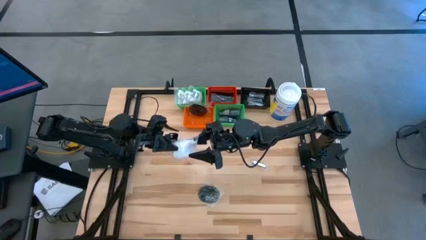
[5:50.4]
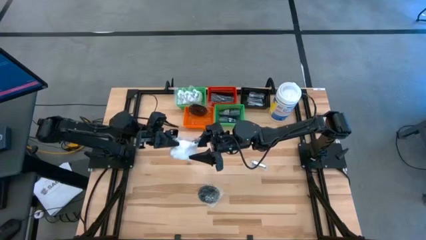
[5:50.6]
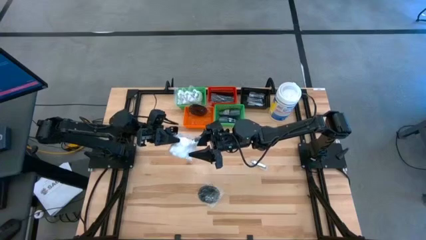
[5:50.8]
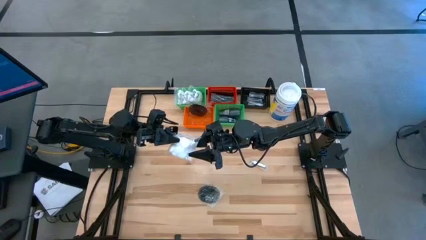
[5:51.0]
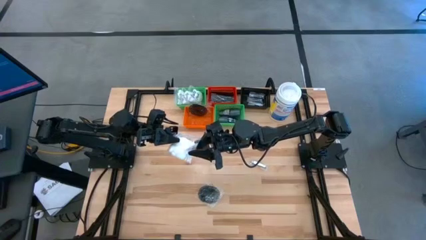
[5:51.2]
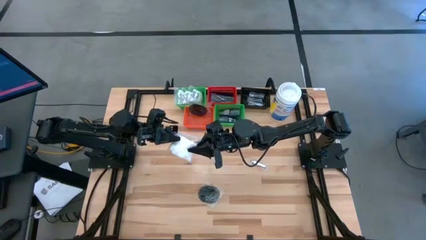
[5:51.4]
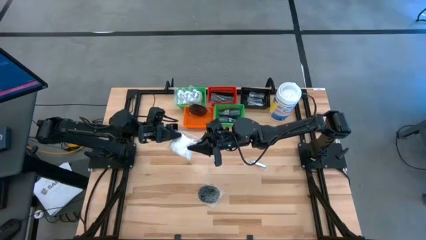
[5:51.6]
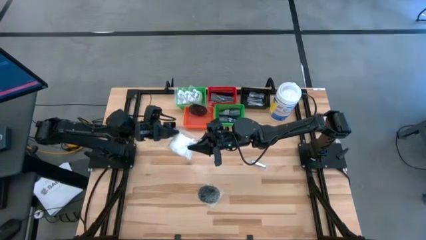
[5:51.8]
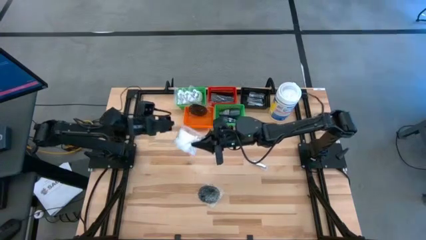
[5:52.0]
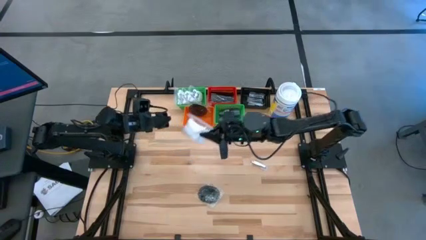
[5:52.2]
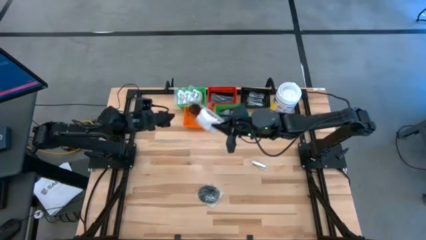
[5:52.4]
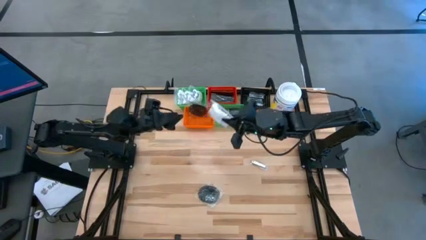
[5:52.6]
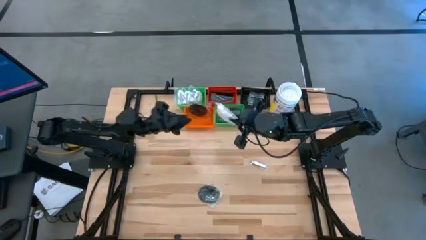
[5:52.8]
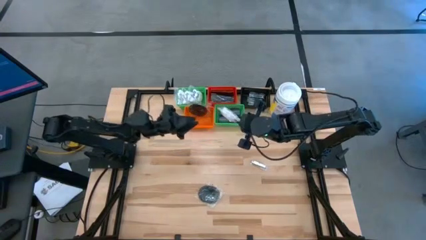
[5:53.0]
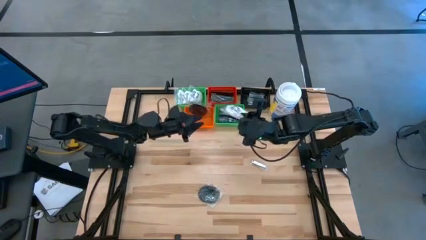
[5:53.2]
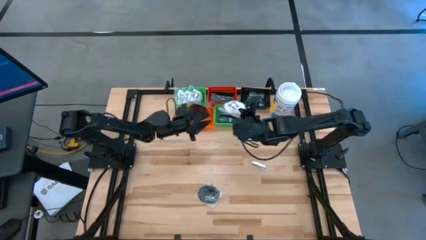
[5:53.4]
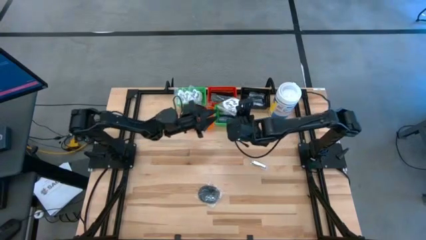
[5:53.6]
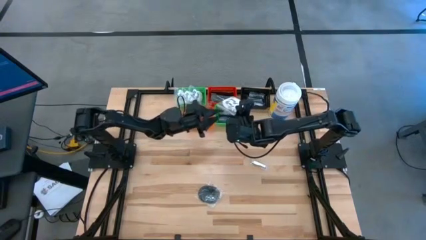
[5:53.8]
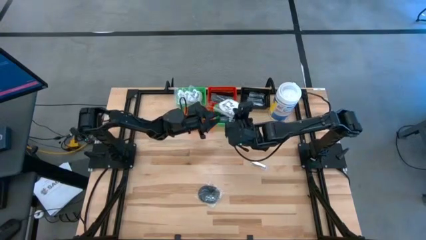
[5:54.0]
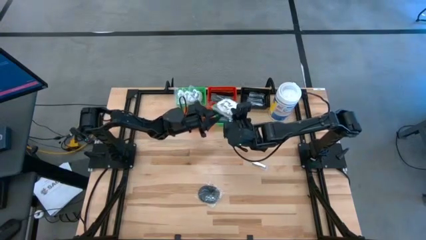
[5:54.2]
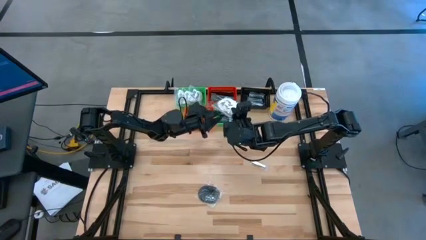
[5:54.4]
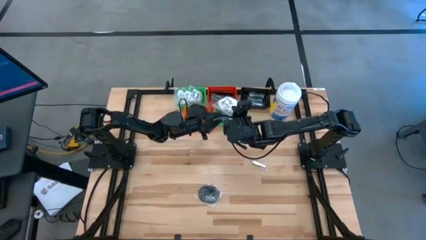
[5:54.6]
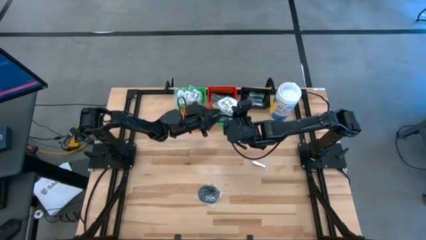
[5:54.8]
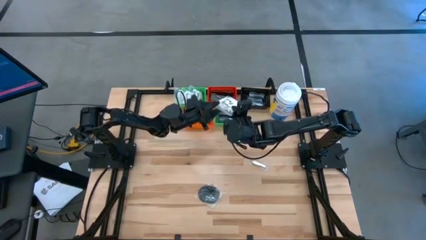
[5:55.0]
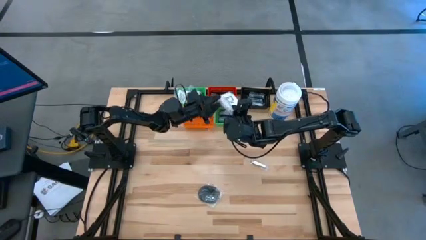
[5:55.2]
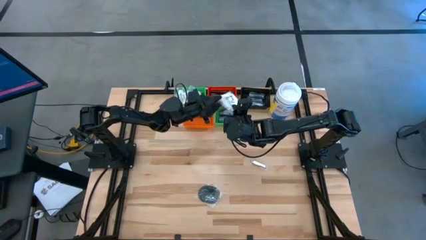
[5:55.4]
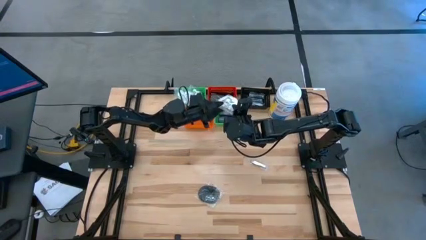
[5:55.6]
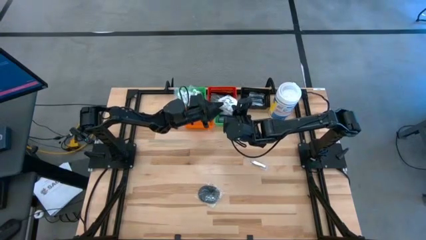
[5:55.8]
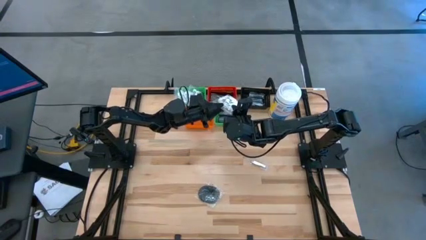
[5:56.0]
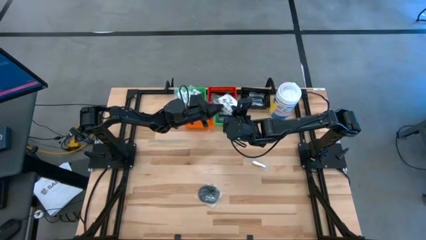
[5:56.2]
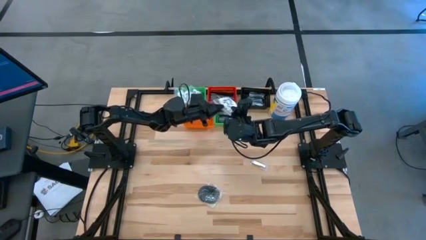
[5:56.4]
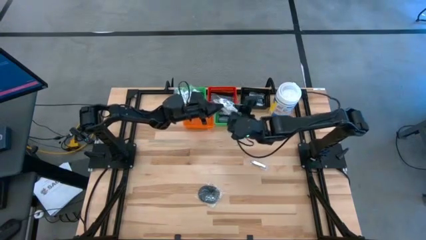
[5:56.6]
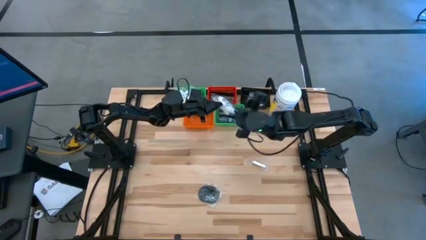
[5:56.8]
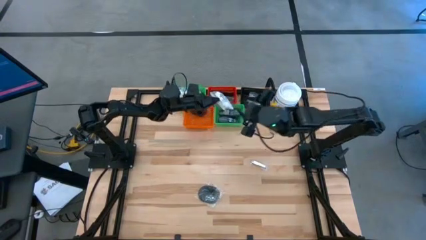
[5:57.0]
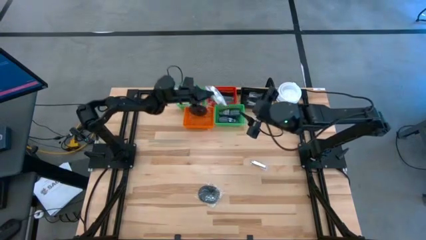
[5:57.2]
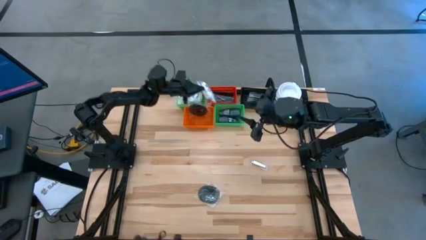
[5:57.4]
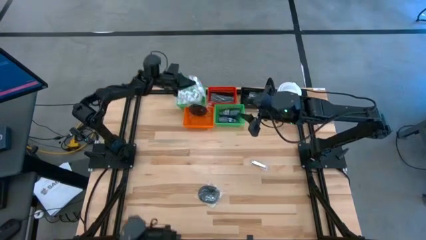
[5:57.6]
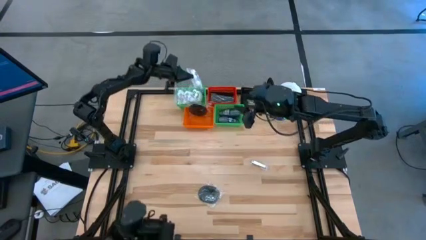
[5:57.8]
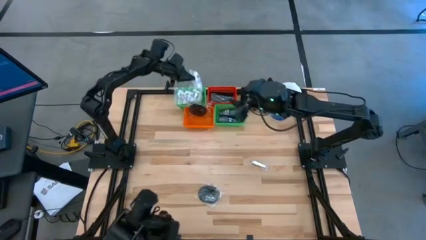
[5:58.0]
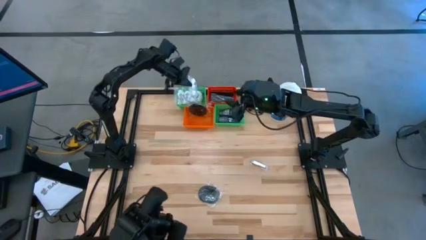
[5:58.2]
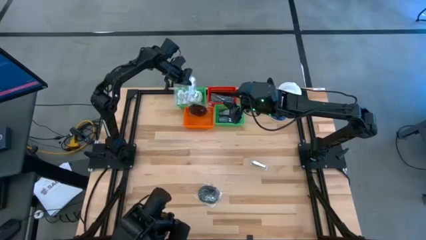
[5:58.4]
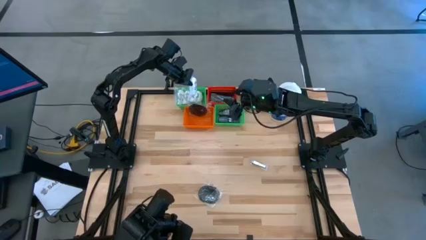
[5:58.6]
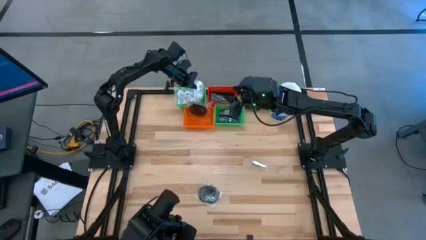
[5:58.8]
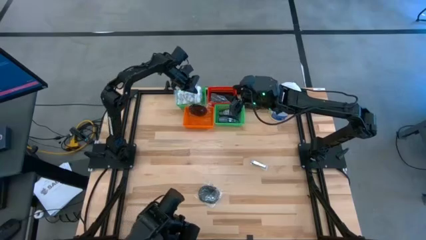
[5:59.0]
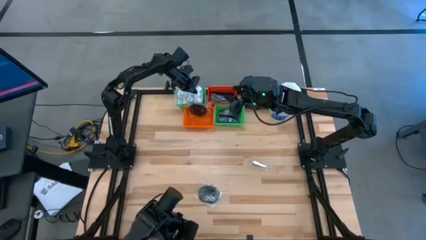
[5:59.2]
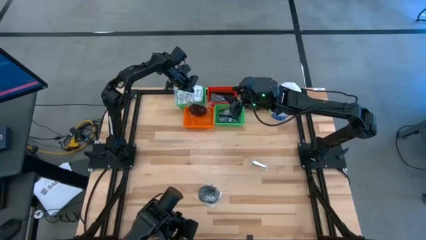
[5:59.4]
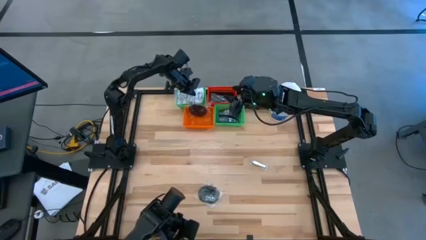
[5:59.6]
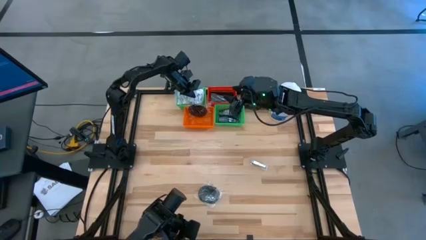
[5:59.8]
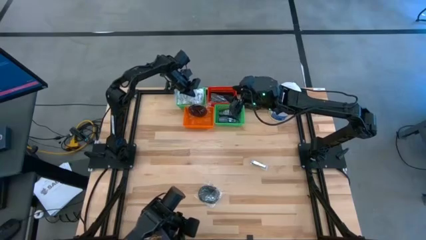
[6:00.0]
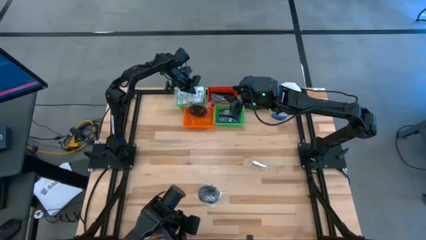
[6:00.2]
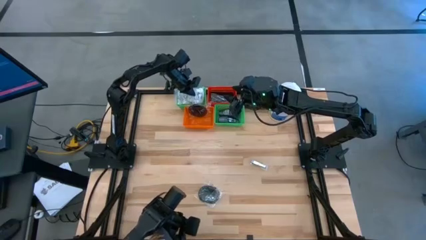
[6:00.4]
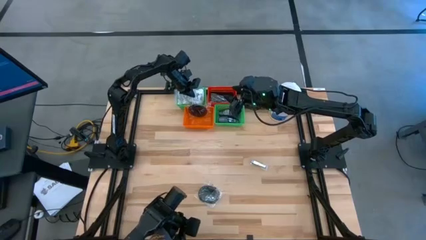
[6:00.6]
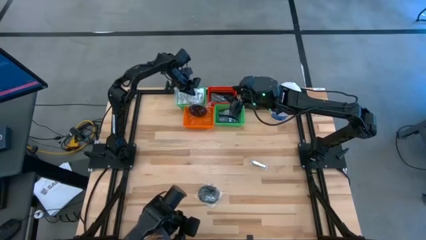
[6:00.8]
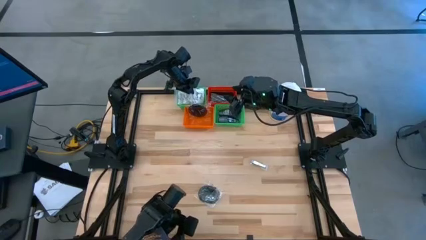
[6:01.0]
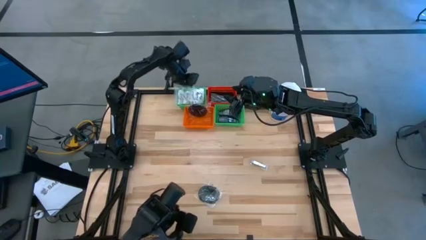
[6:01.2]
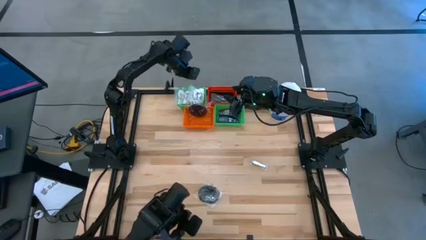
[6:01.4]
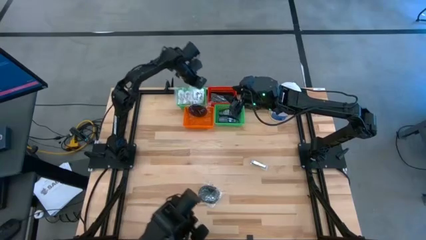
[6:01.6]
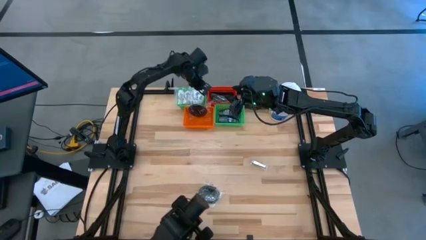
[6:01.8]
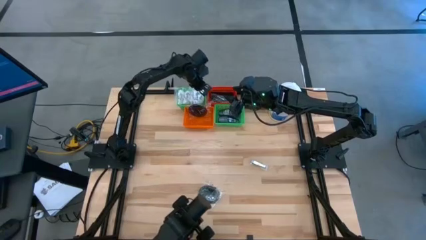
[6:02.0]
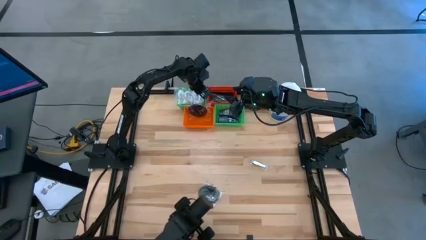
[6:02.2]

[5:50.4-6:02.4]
Task: Pick & Place Travel size toiletries
Put the vanity pack into the green bin

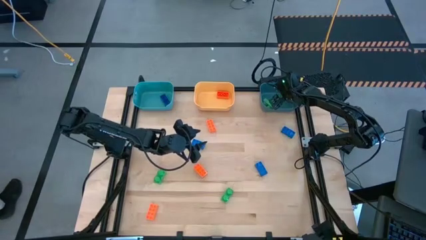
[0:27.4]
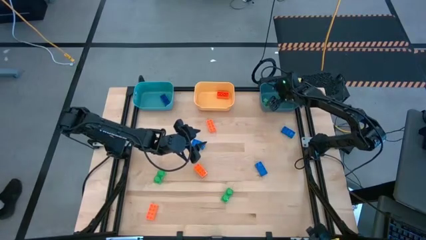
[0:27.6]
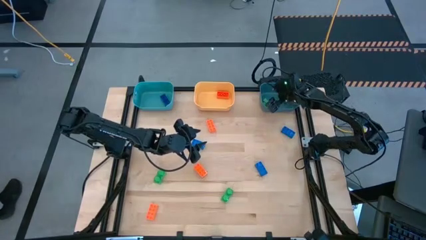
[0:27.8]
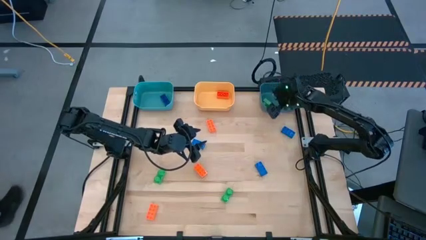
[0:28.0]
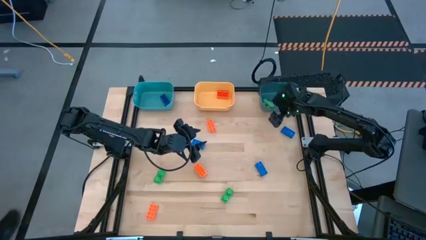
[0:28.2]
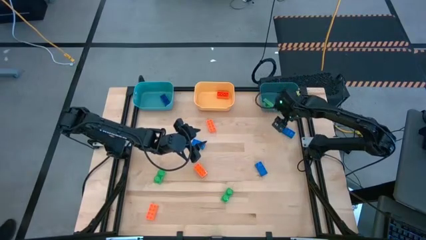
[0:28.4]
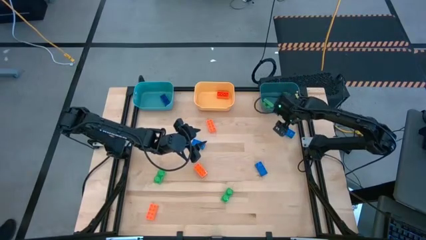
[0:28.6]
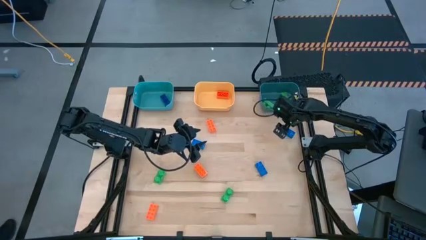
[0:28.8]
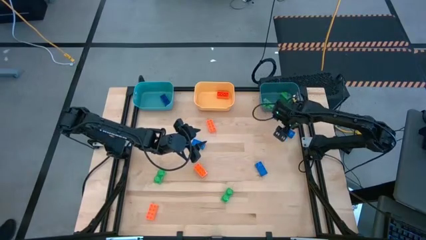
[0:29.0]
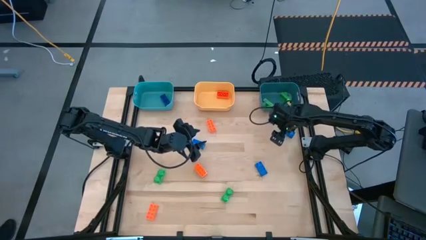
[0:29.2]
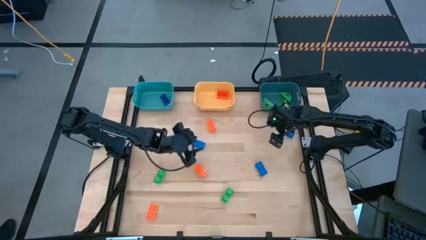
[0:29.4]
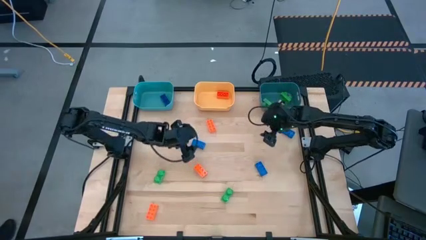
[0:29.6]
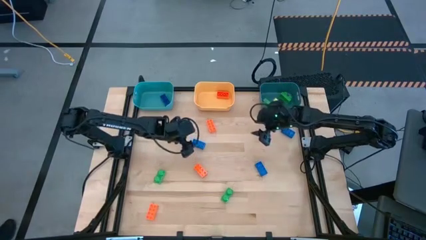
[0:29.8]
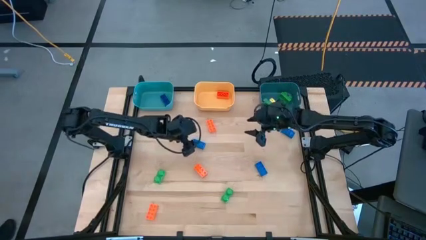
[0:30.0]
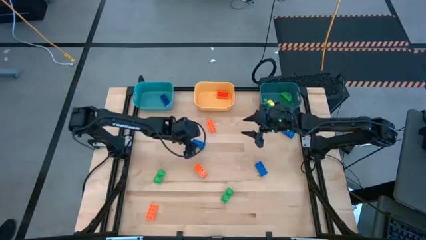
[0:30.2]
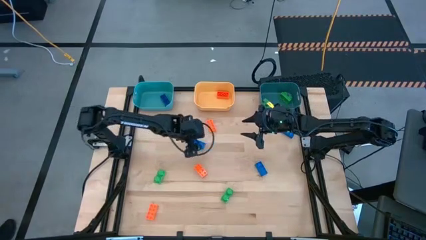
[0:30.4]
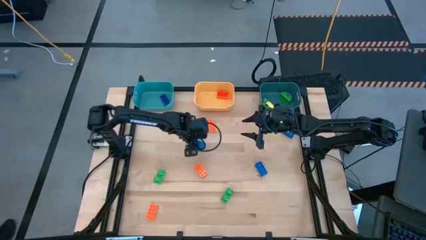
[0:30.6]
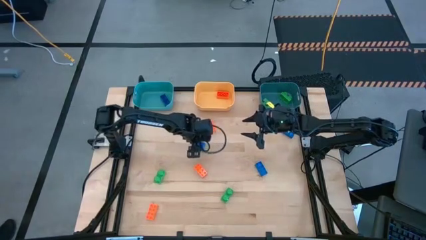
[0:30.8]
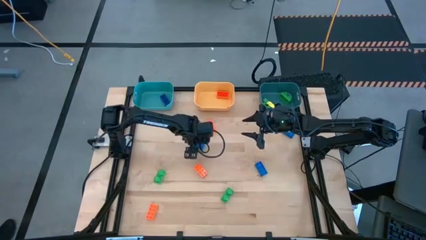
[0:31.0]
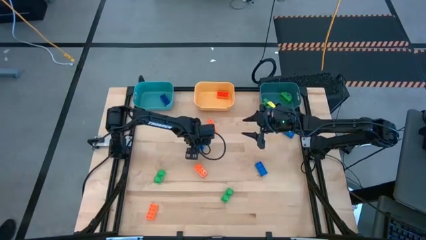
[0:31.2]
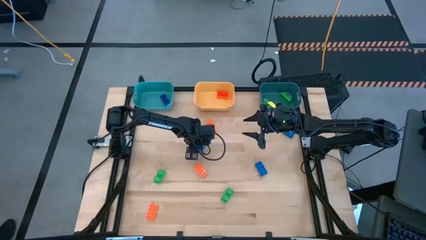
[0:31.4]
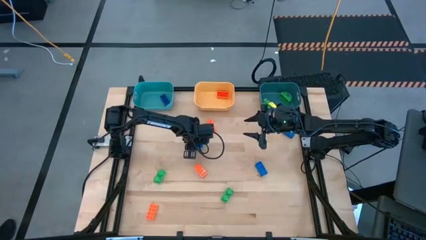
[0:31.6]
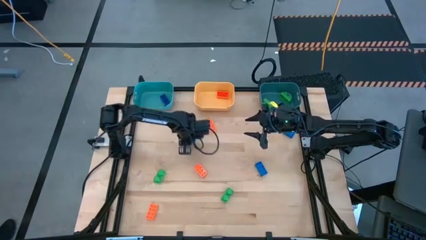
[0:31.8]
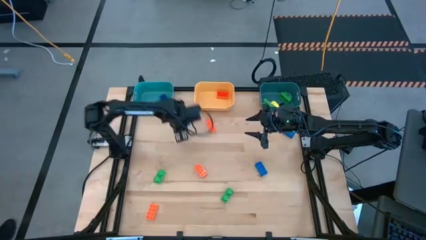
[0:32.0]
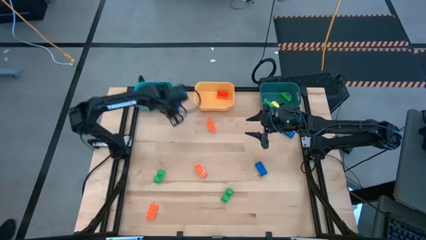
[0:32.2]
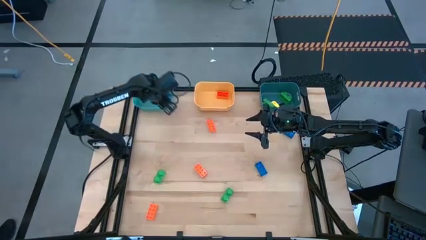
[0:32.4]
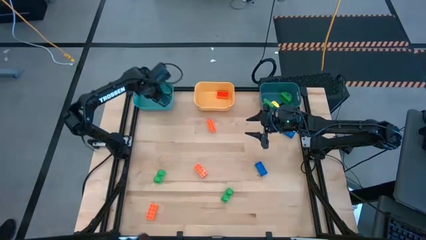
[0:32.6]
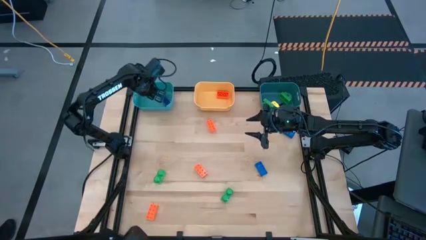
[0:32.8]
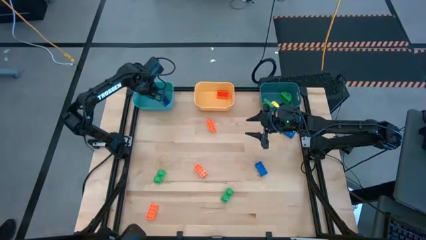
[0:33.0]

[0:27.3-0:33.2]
Task: Sort & place blocks by color
Put the blue game piece into the blue bin
